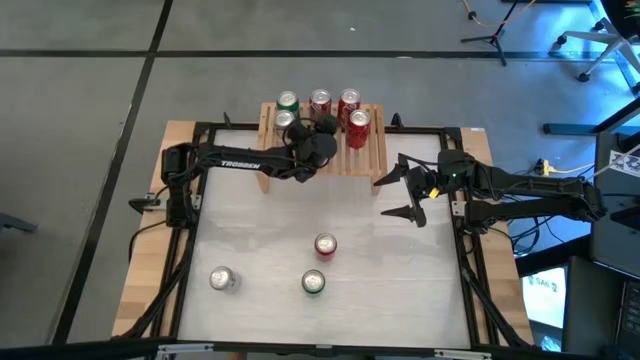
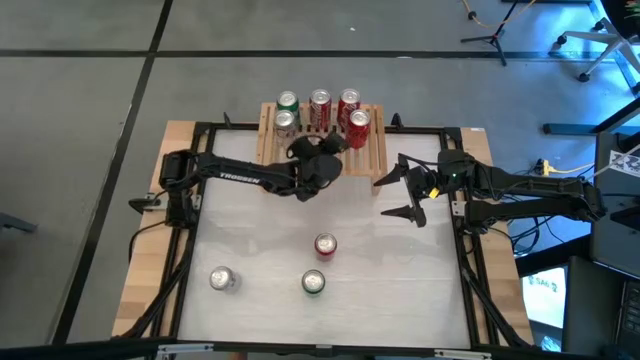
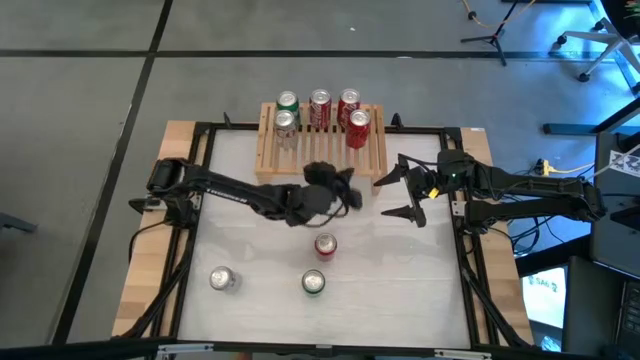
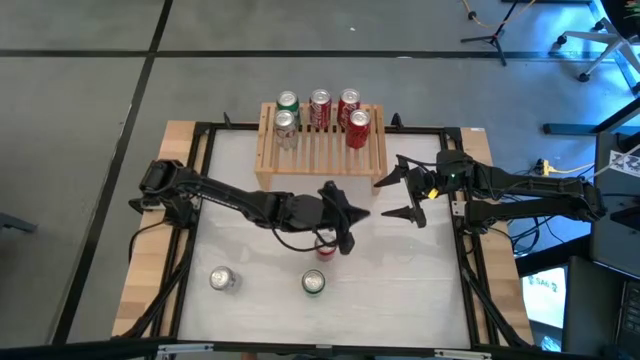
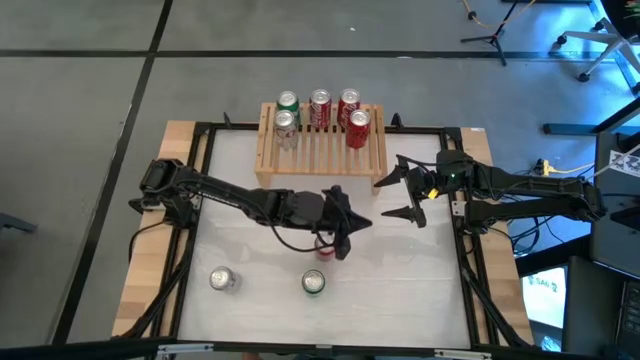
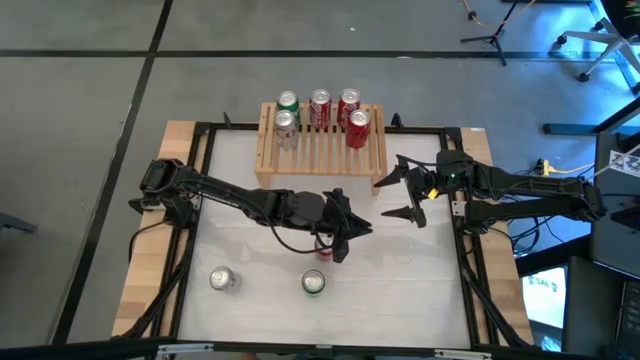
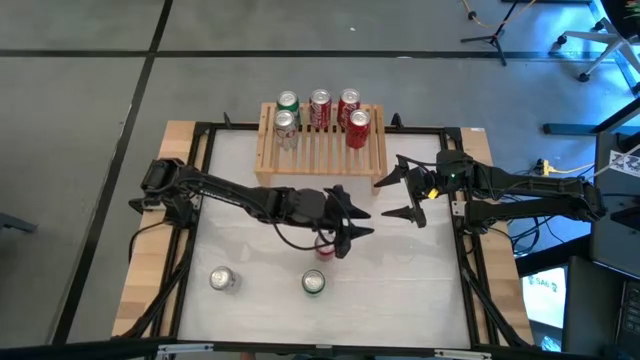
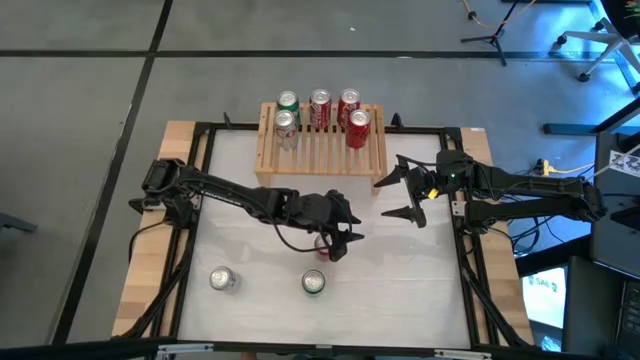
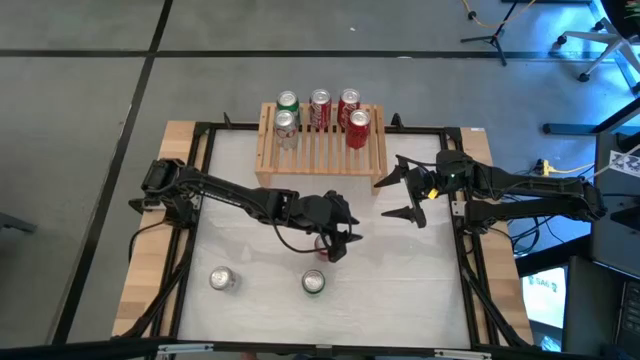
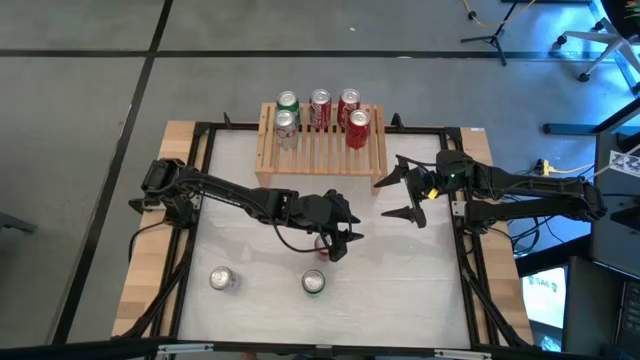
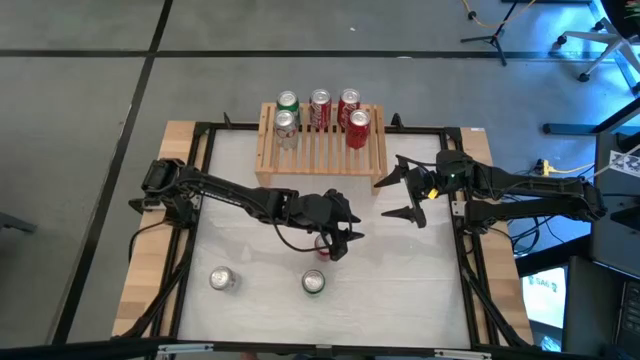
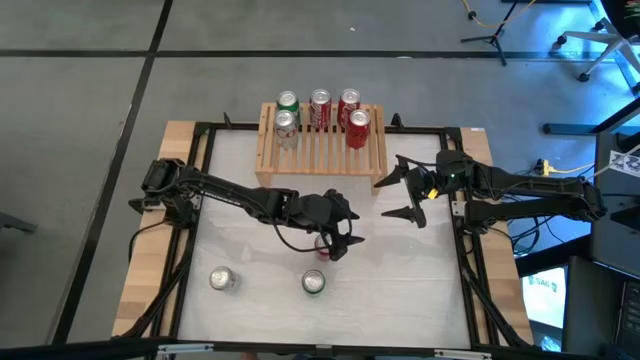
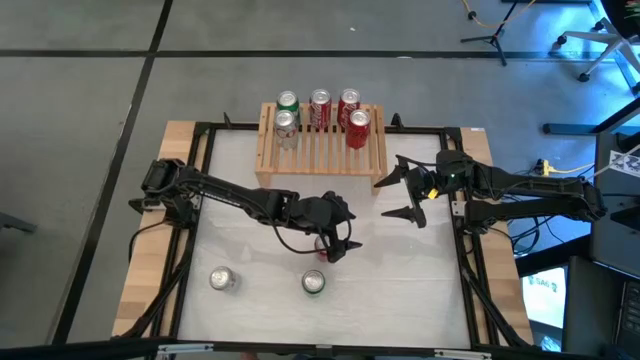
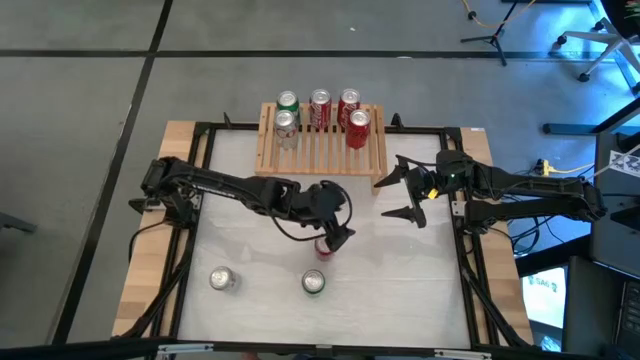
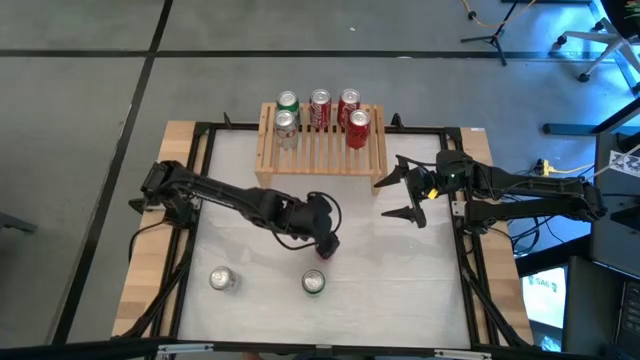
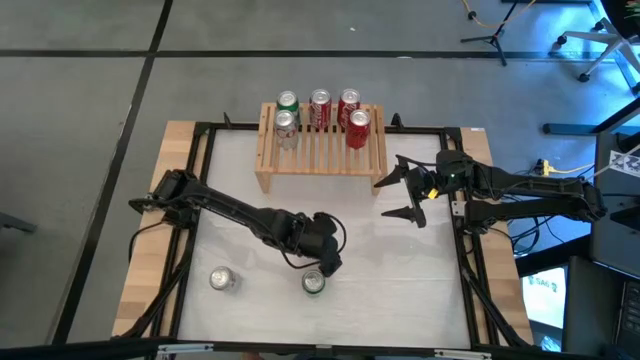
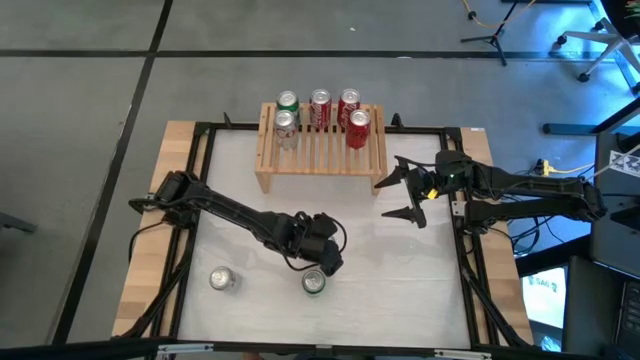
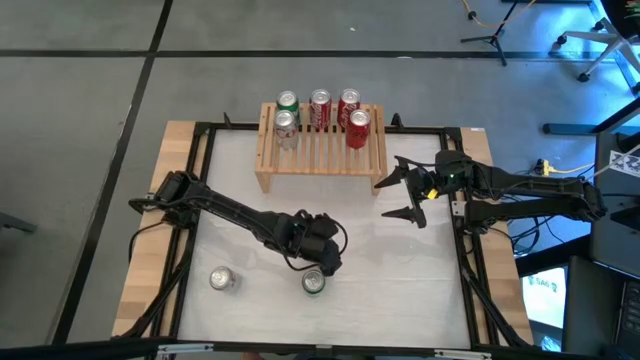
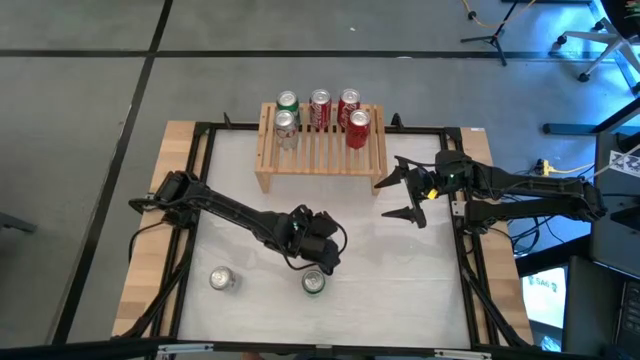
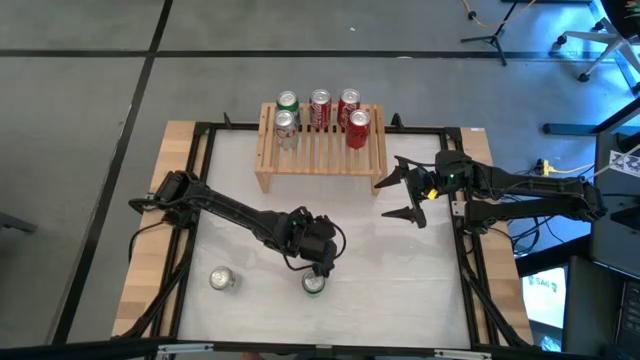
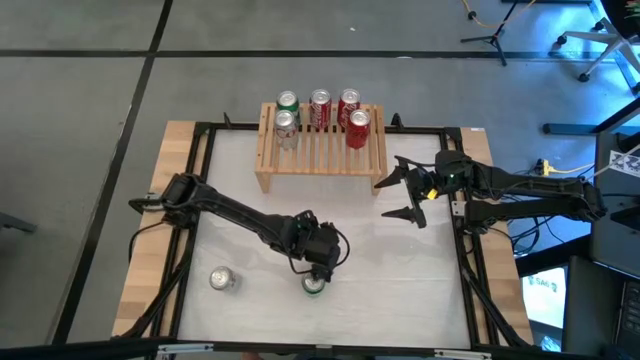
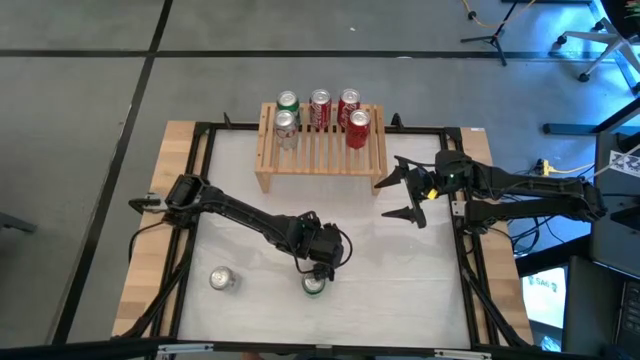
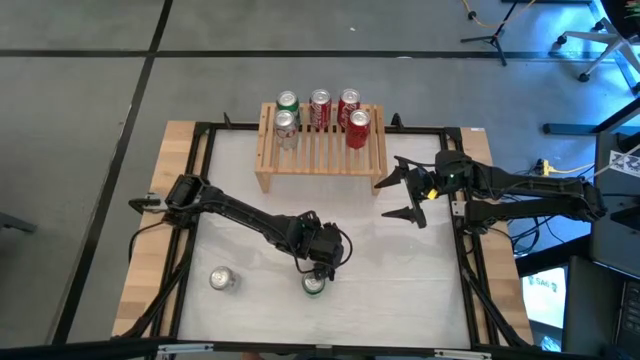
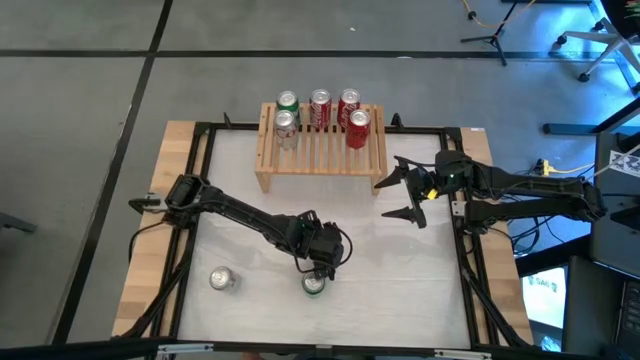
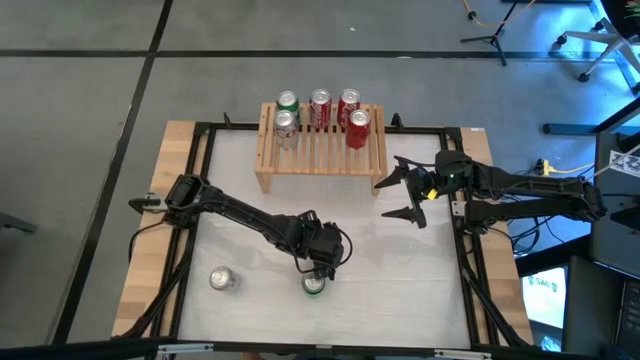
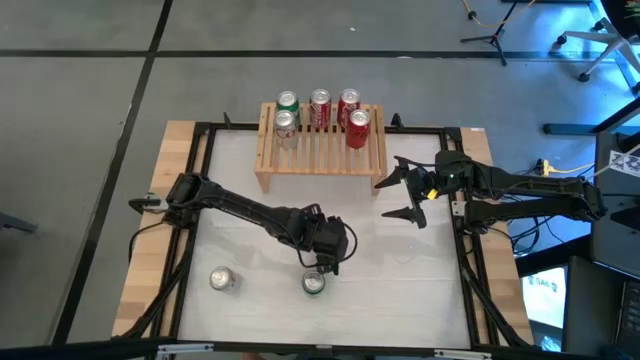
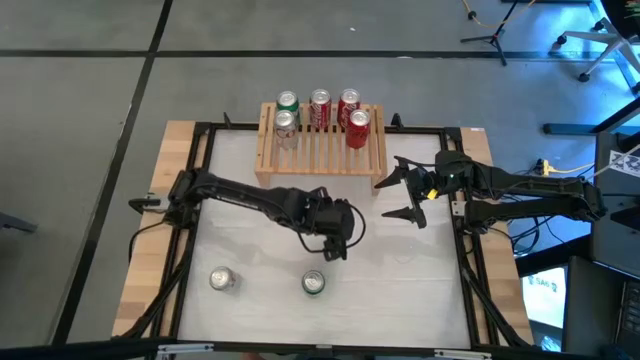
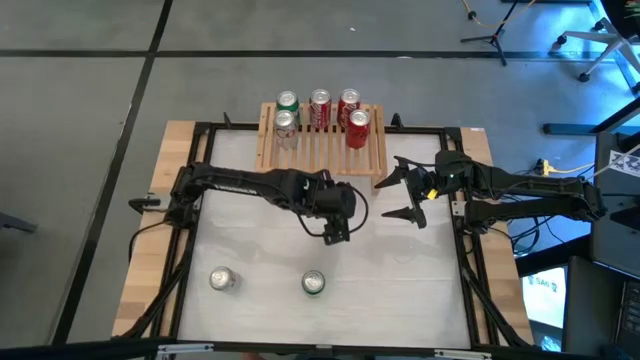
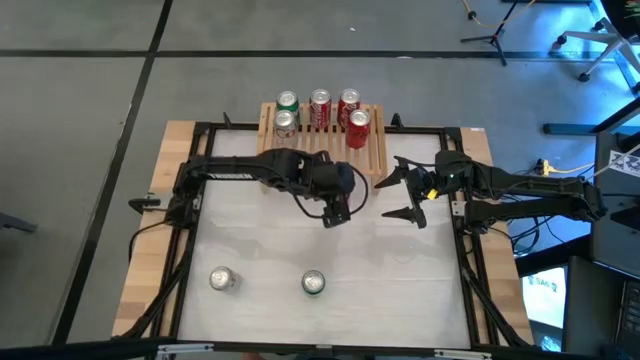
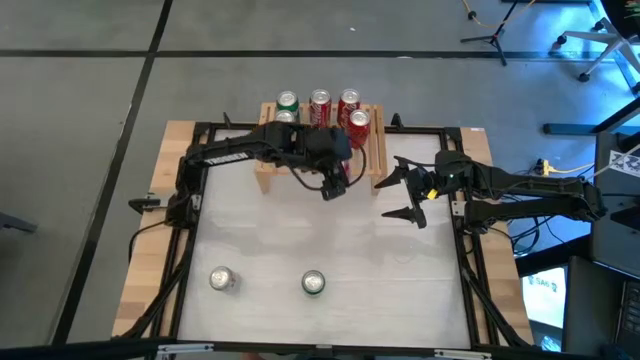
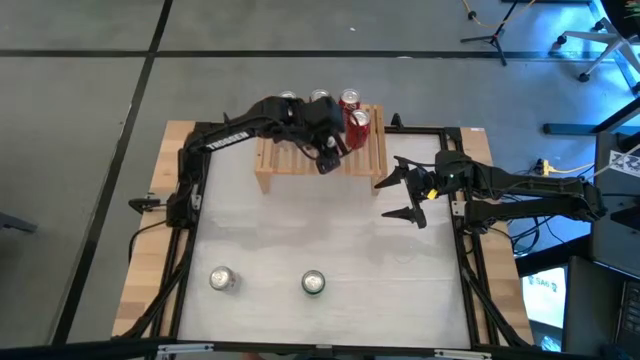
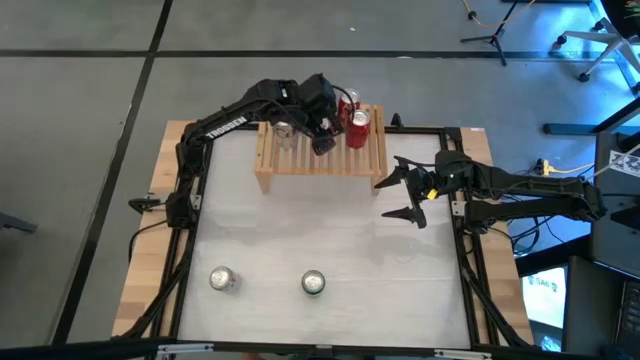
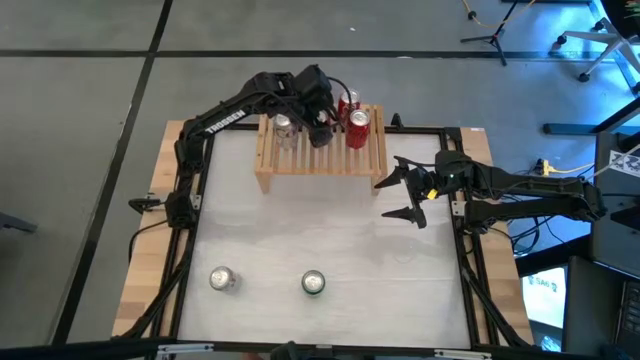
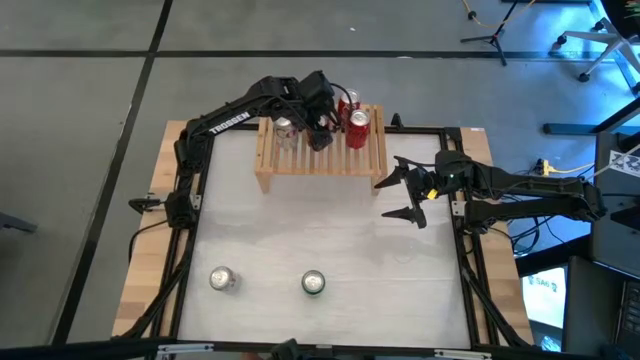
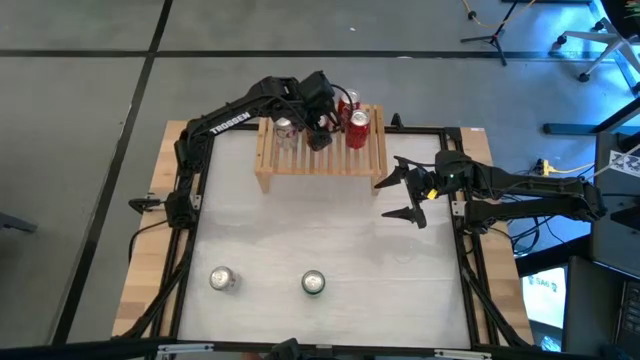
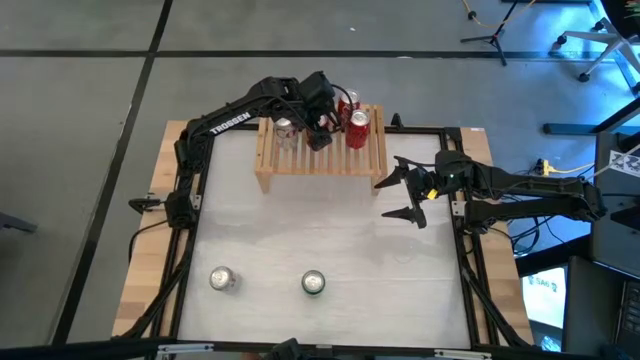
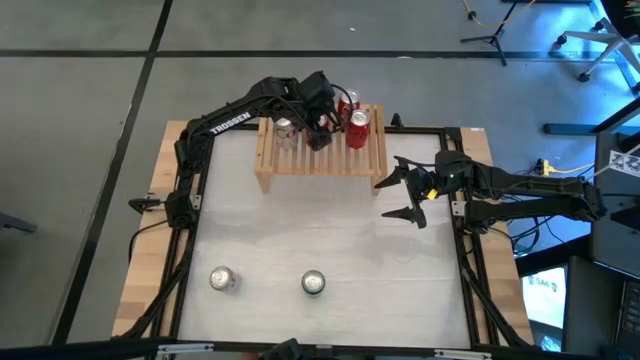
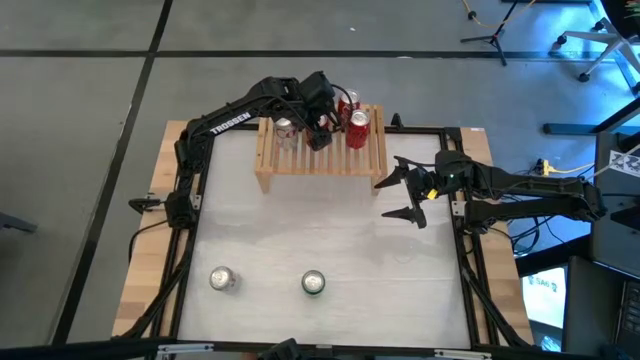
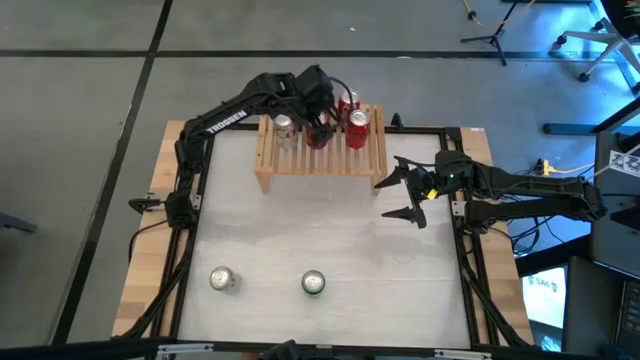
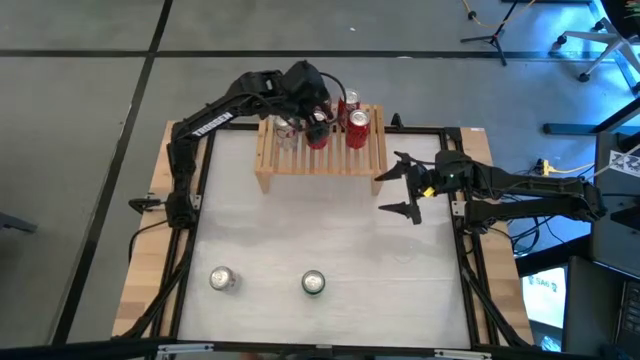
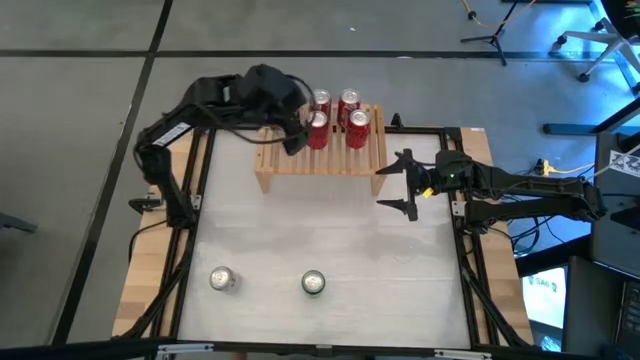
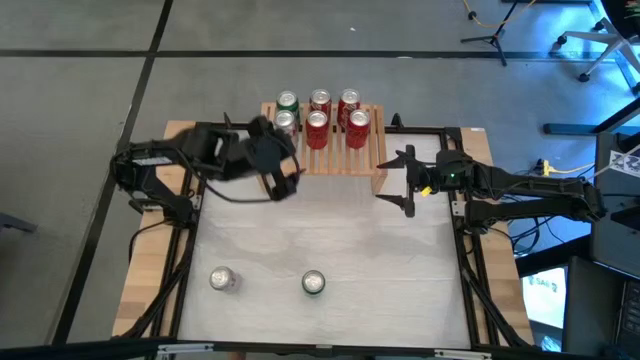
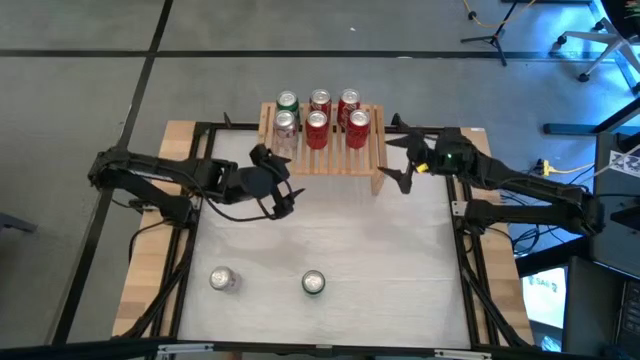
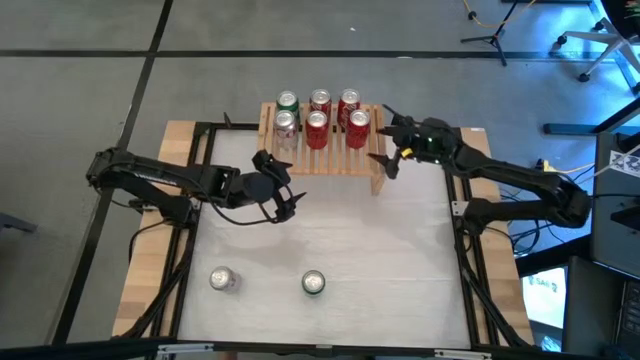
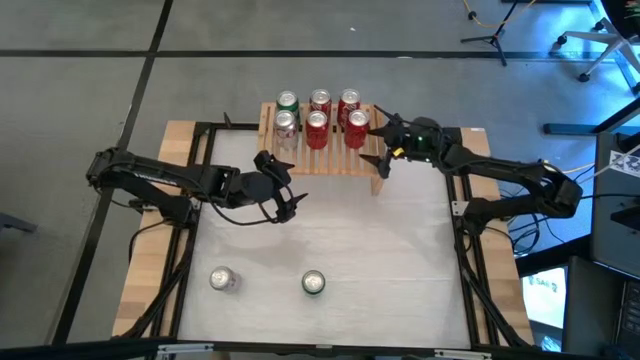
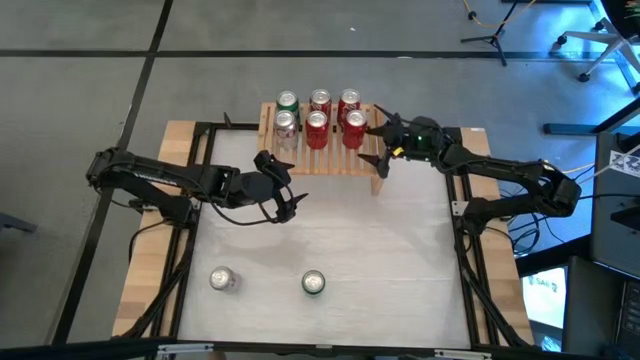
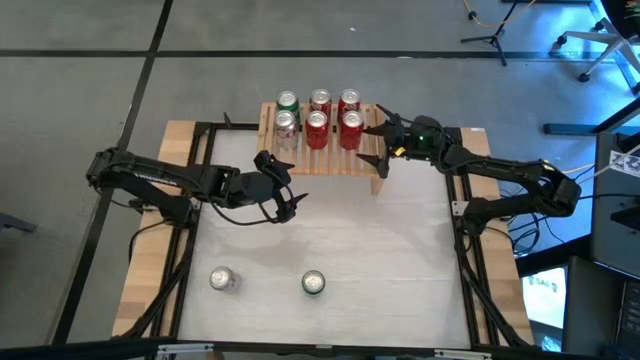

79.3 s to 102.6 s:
Task: Place canned beverage on shelf
Put the red/black soda can on the shelf aligned with the red/white soda can
